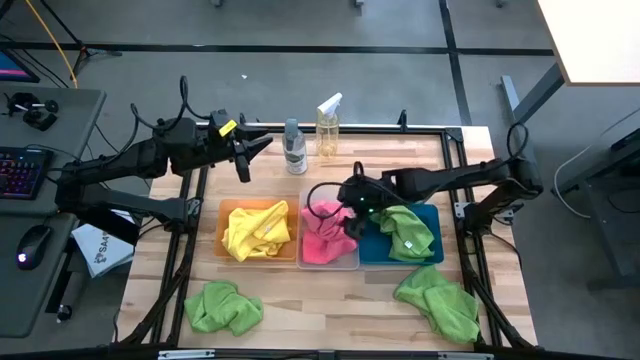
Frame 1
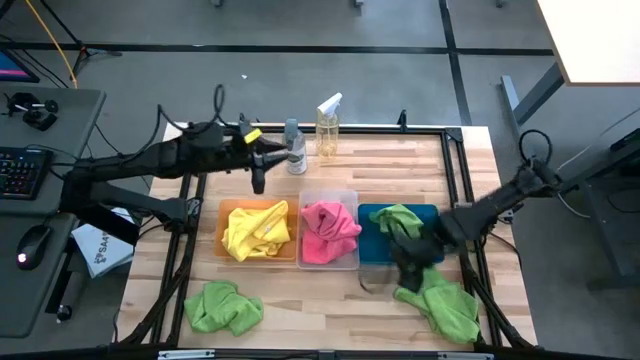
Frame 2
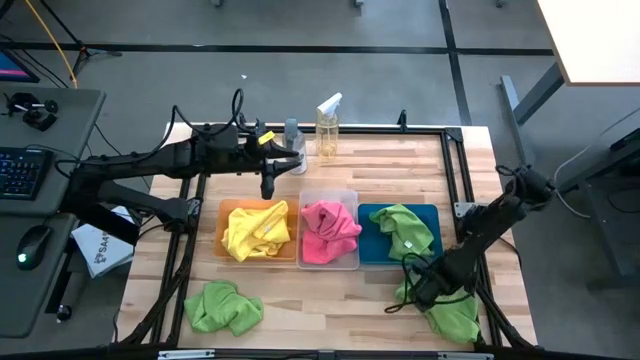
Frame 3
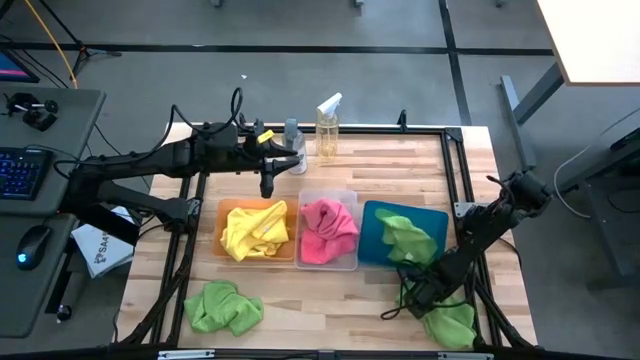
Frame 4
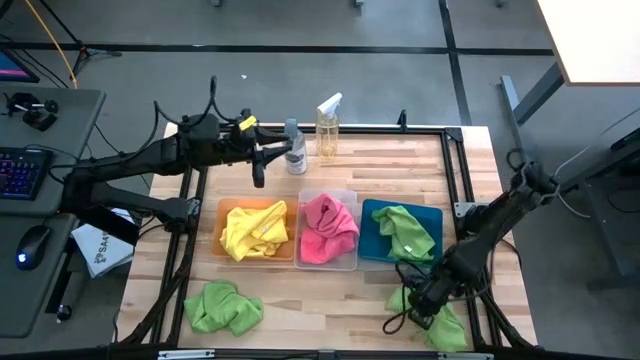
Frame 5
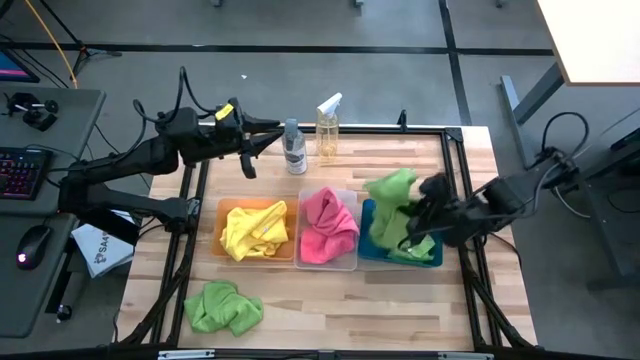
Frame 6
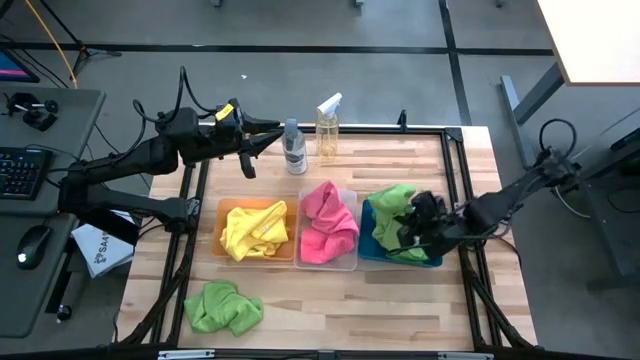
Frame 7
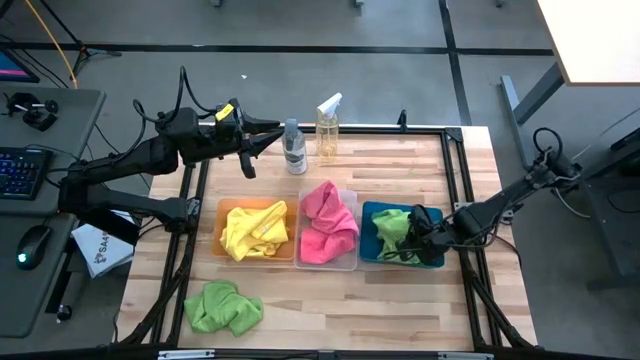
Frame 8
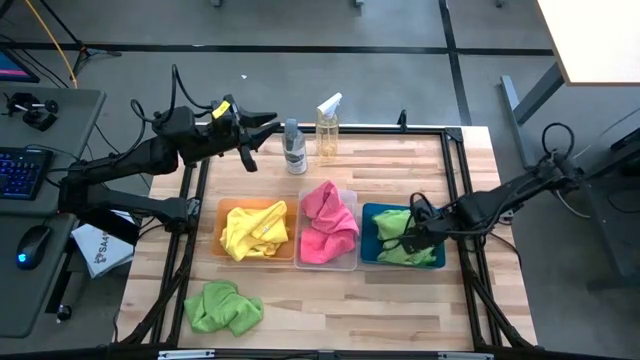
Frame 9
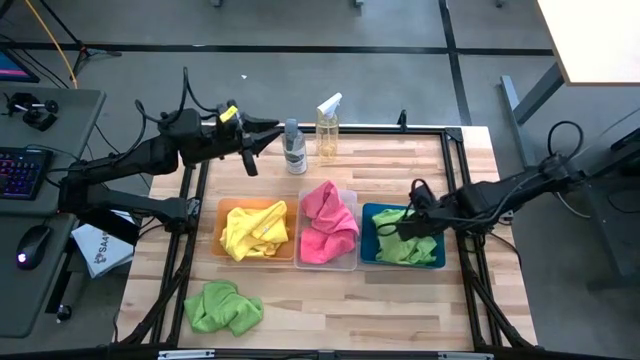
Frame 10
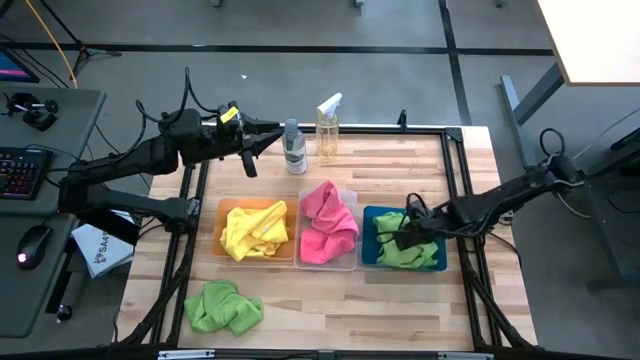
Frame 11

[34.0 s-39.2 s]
Task: Sort microfiber towel by color & place in baskets
Put the right green microfiber cloth into the blue bin

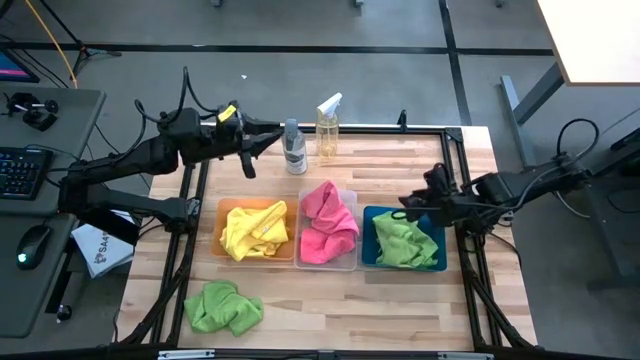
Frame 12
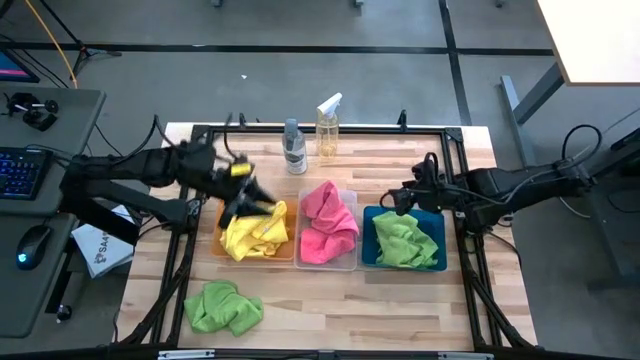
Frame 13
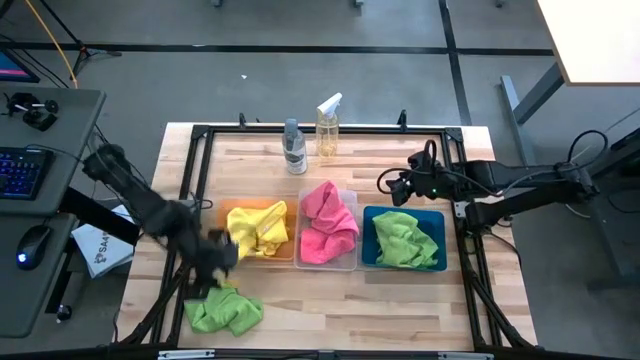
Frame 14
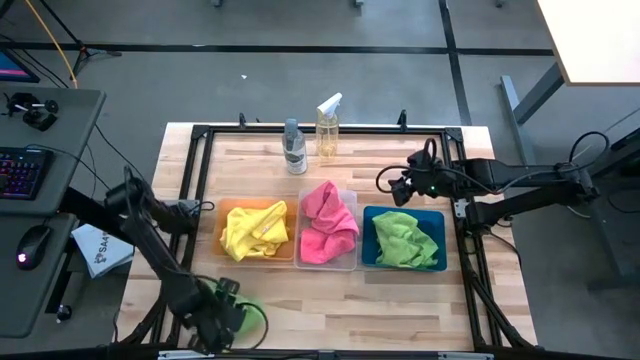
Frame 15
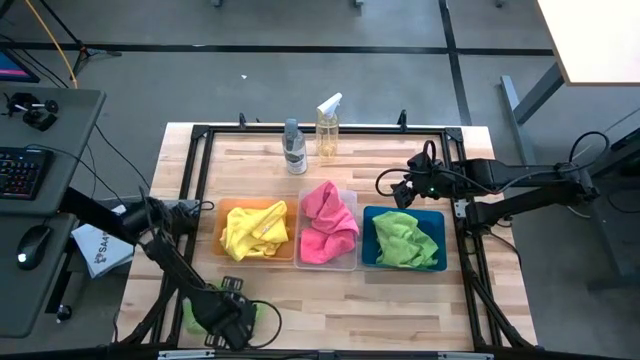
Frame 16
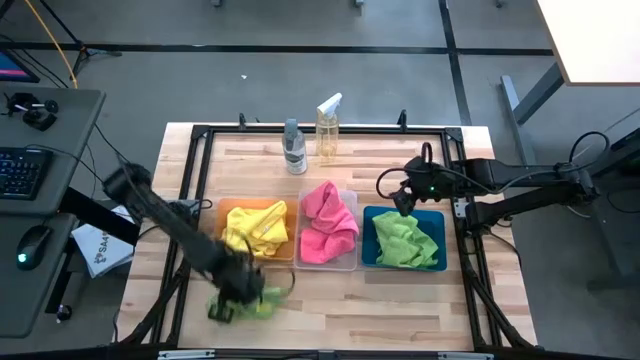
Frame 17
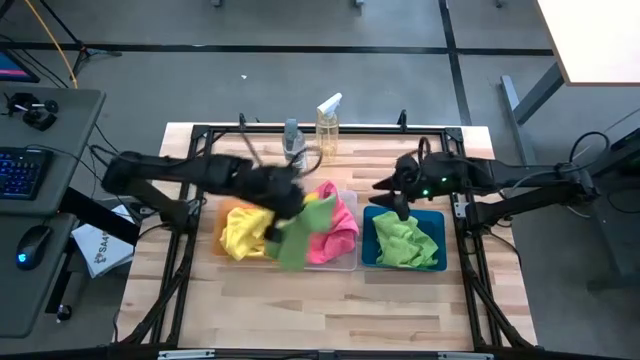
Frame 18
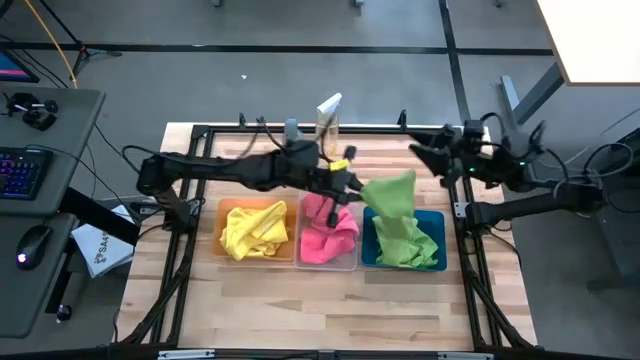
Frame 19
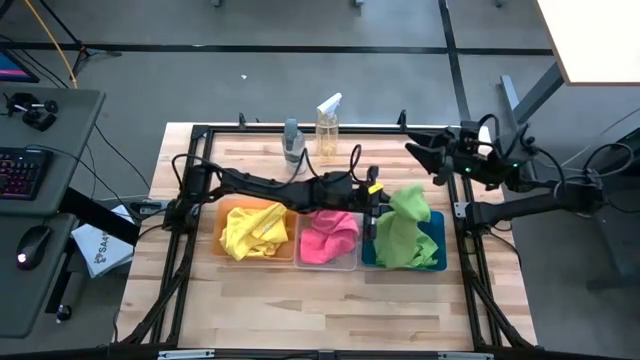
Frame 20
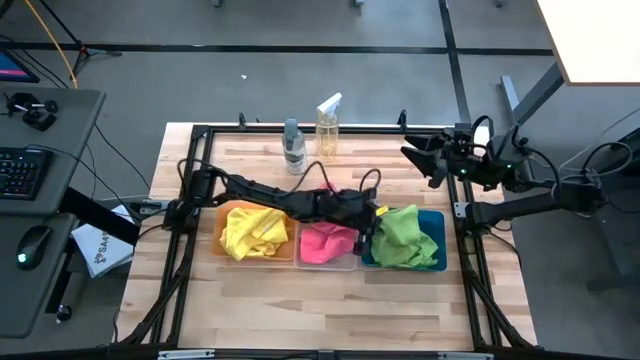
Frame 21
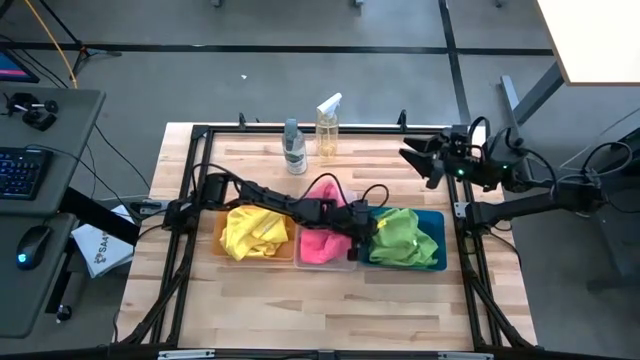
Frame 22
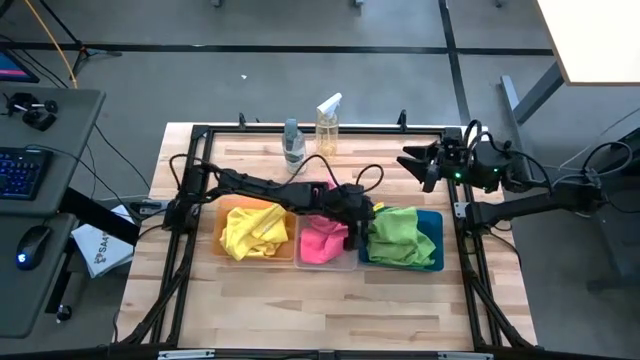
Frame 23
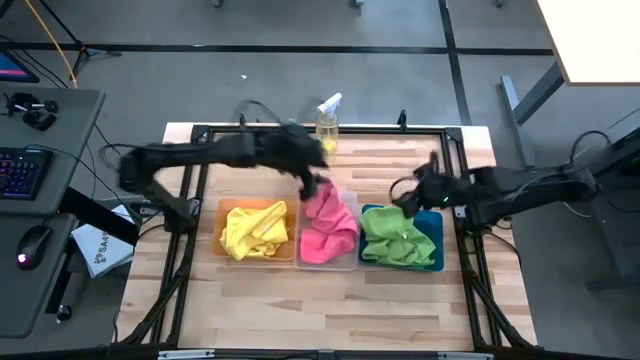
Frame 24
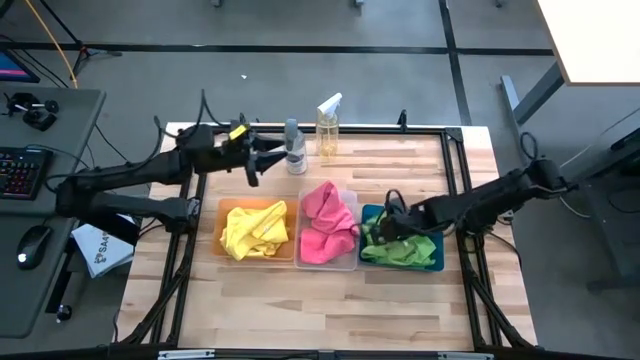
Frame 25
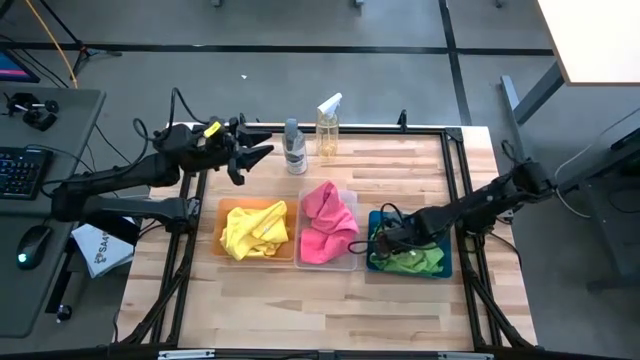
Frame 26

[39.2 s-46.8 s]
Put the green microfiber cloth into the blue bin

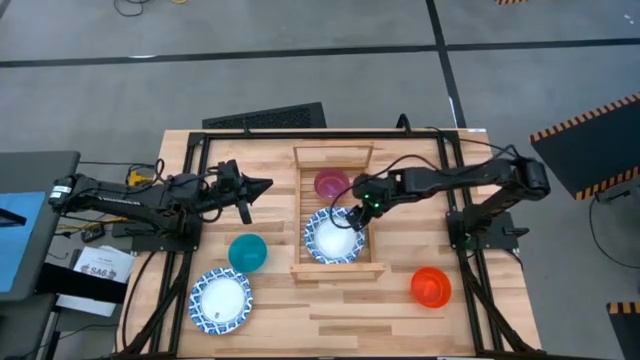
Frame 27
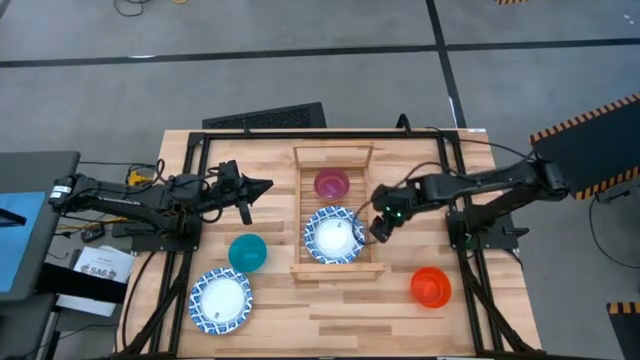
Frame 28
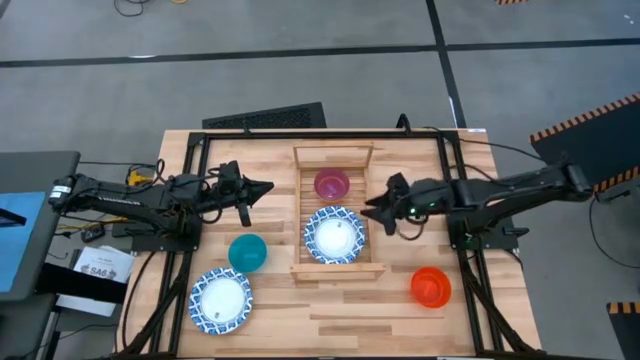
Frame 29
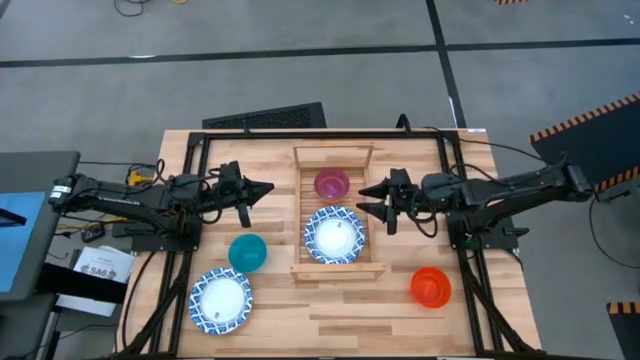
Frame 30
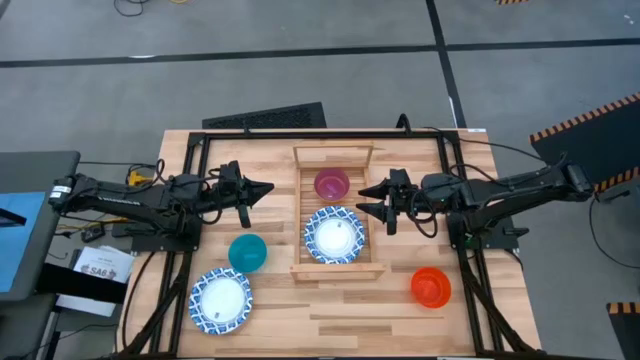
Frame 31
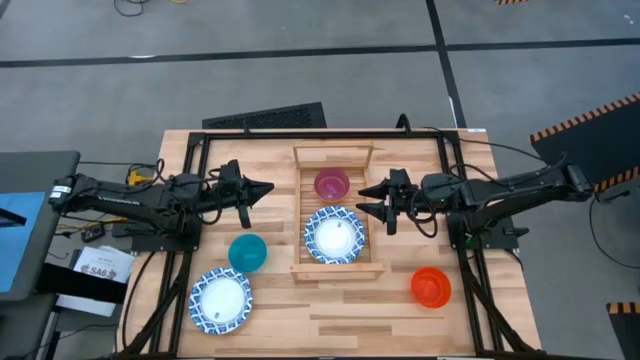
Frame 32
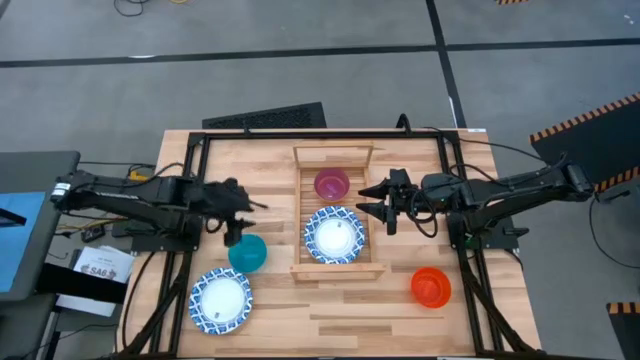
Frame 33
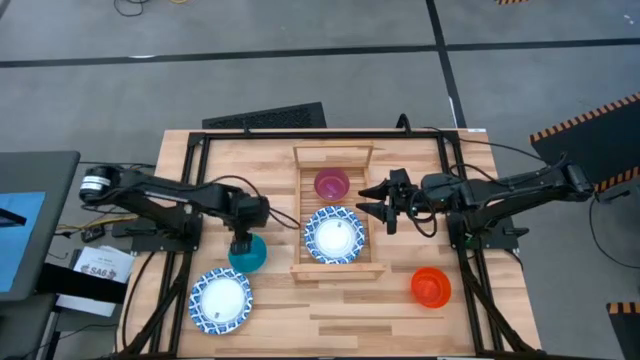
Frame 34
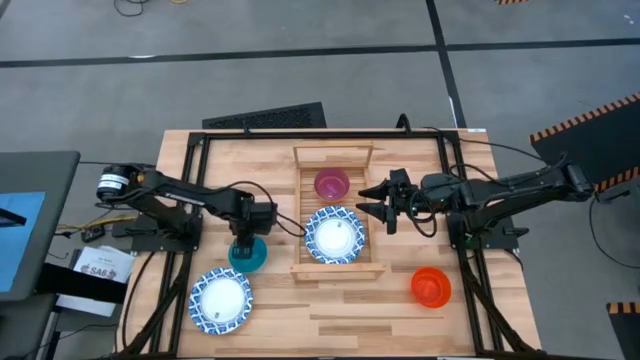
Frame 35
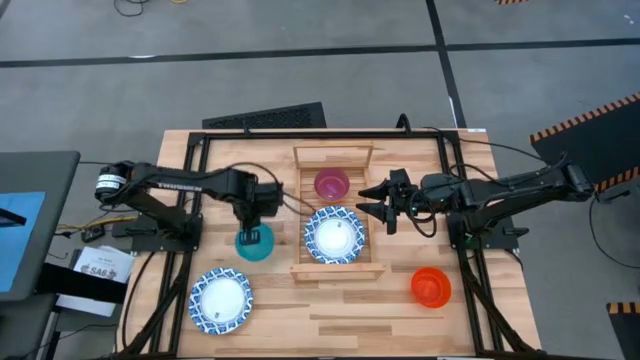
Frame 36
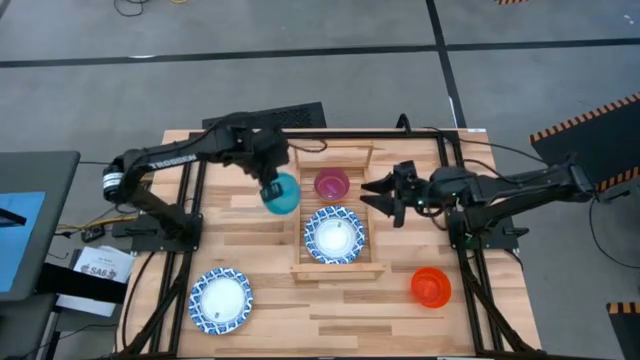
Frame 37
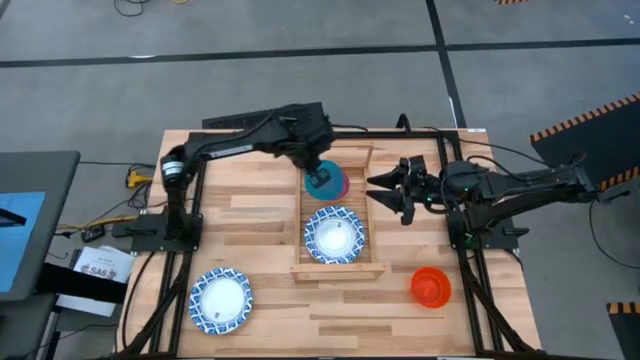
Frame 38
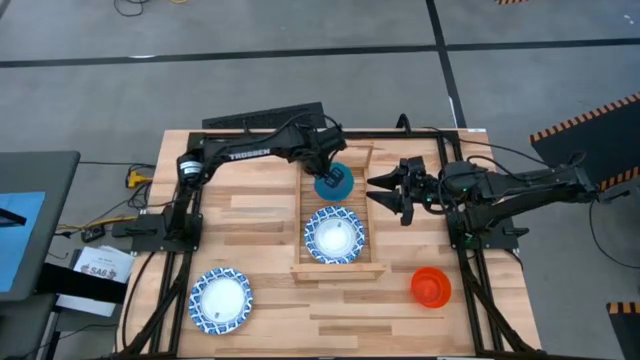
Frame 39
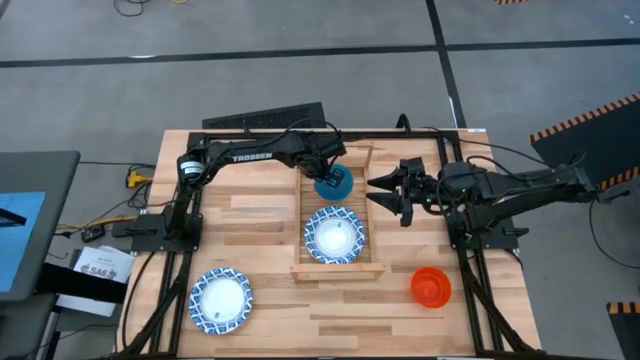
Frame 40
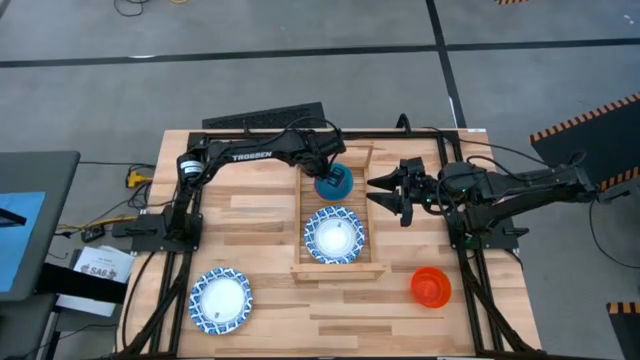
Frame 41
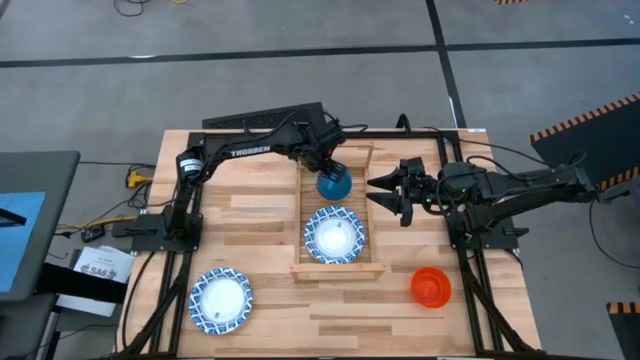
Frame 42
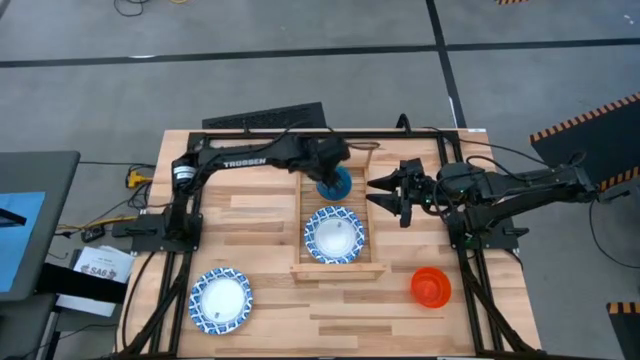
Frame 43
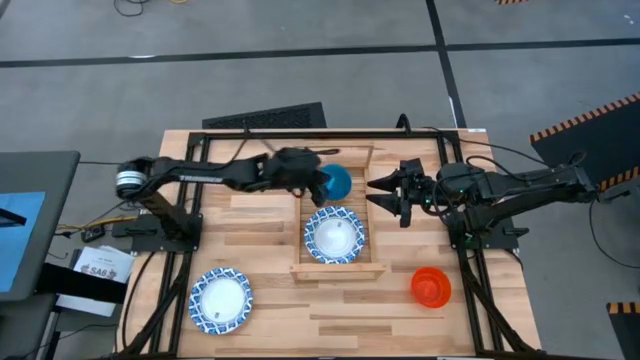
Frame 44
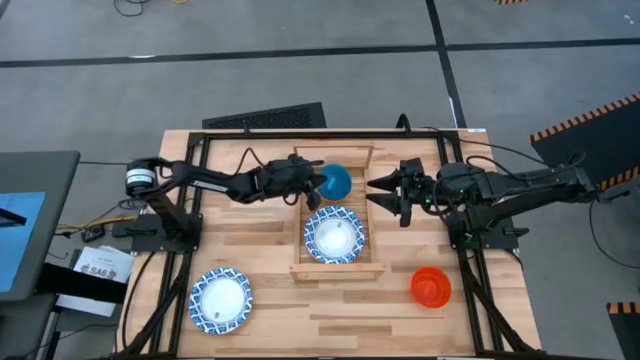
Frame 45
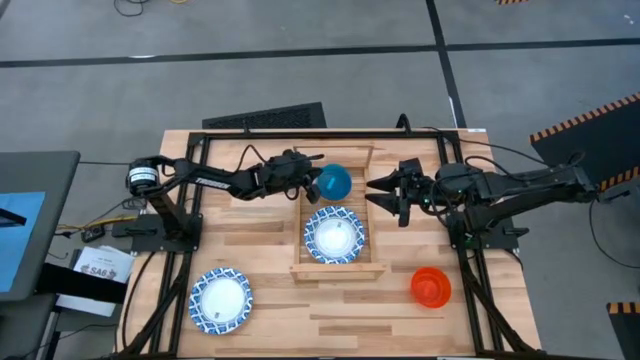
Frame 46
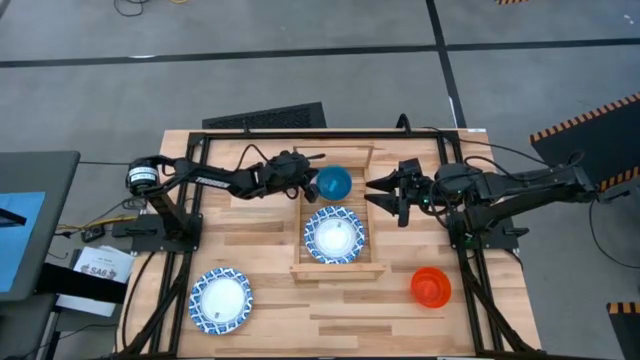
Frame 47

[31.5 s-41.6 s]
Task: Place and stack bowls onto a shelf
Stack the blue bowl on top of the violet bowl on the shelf
